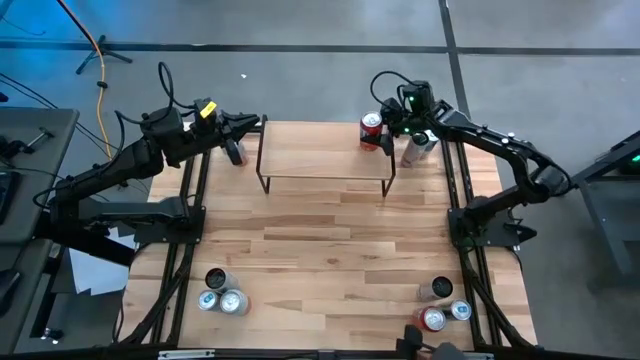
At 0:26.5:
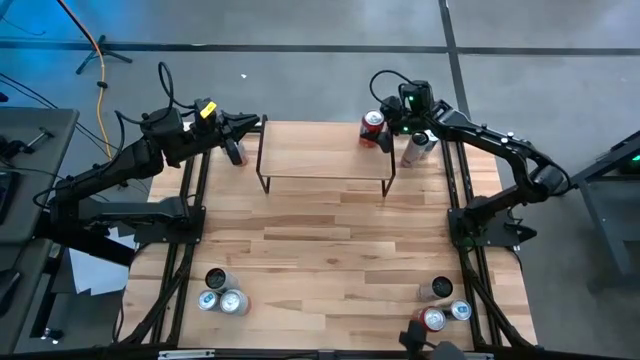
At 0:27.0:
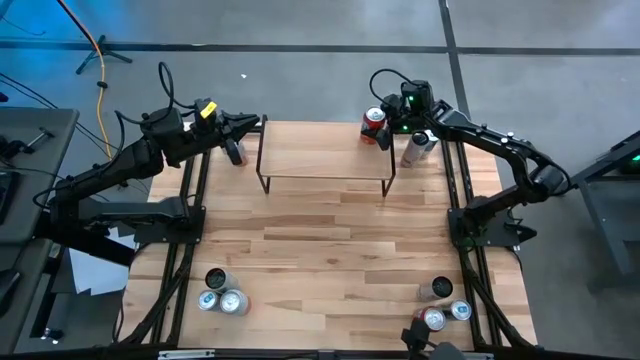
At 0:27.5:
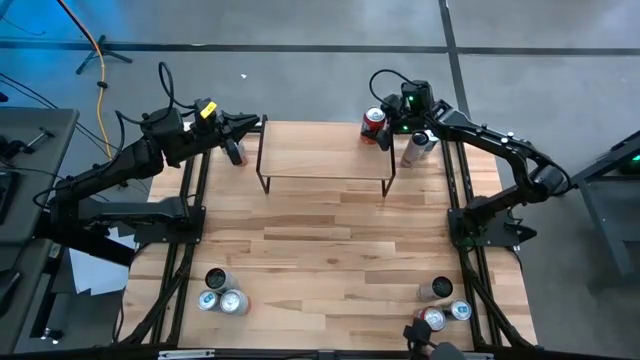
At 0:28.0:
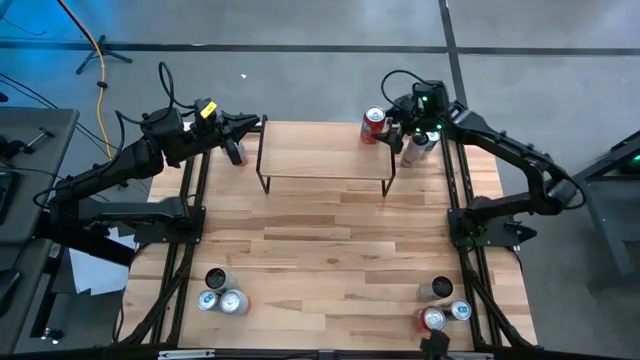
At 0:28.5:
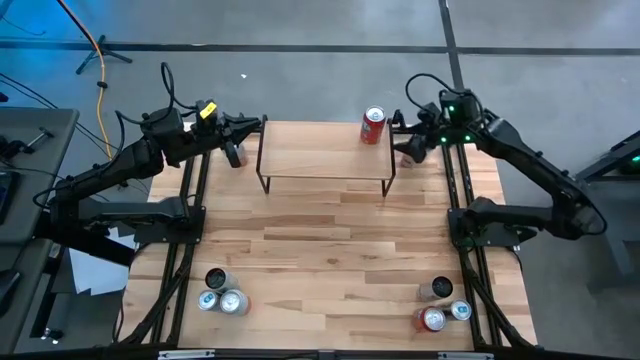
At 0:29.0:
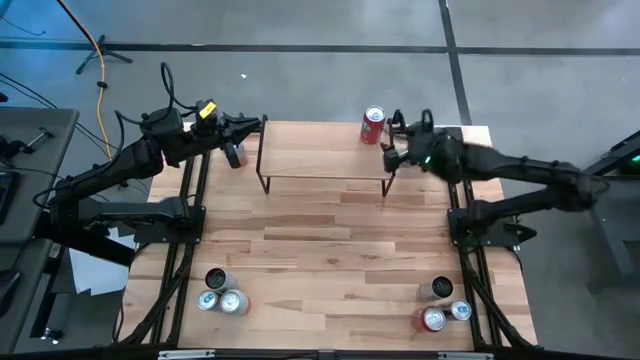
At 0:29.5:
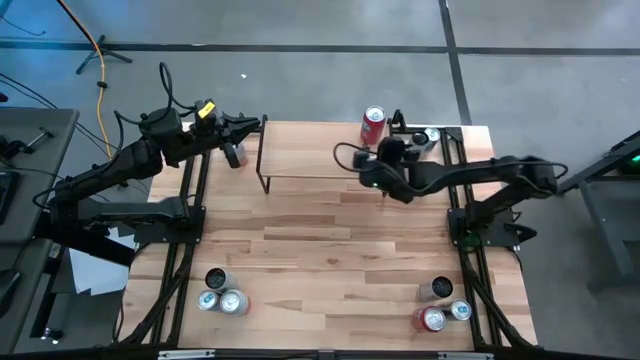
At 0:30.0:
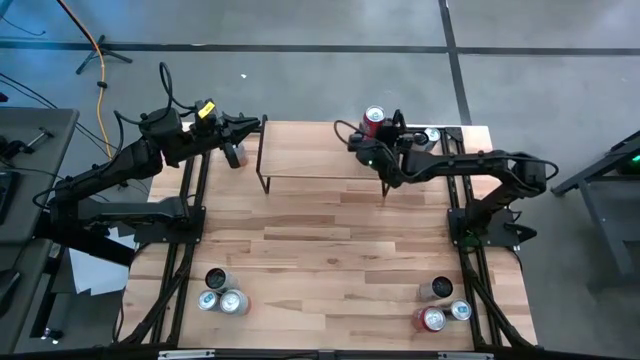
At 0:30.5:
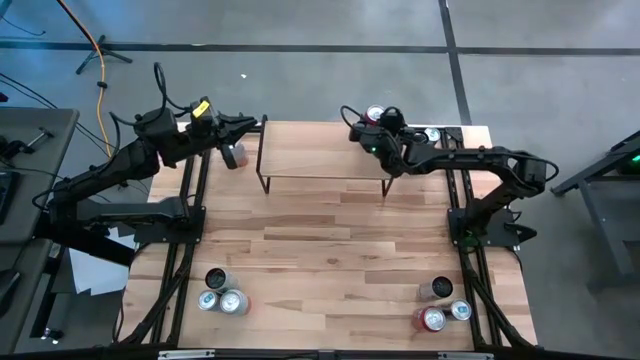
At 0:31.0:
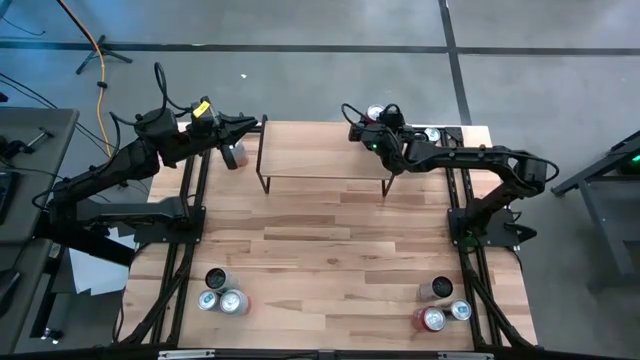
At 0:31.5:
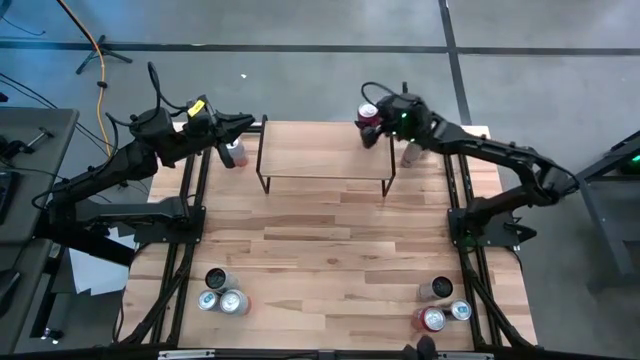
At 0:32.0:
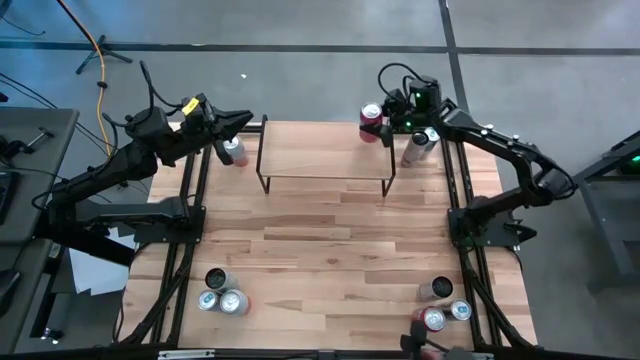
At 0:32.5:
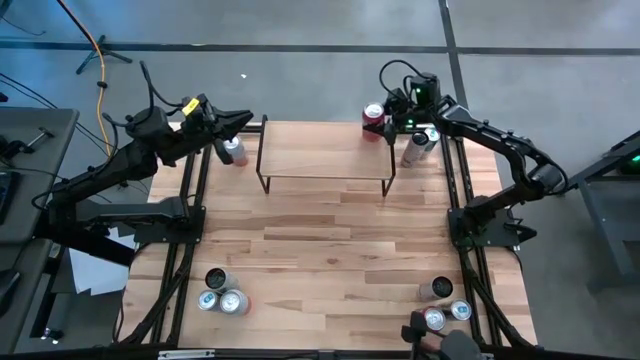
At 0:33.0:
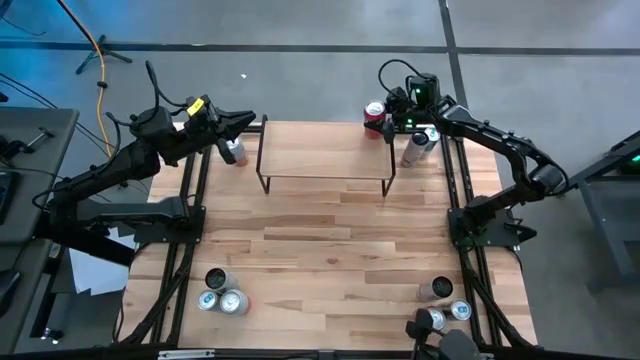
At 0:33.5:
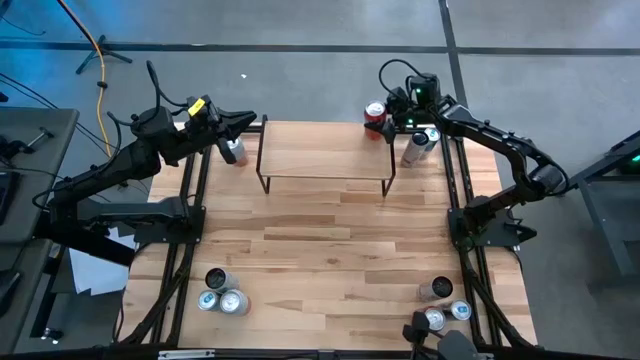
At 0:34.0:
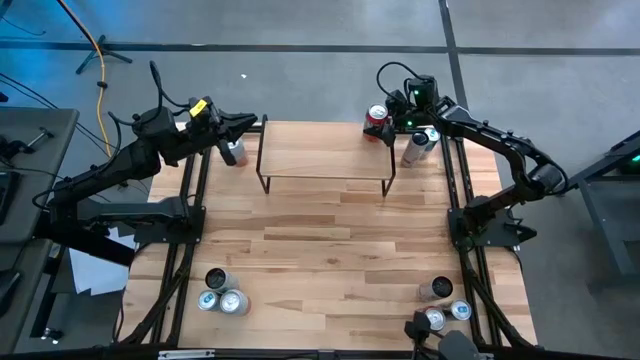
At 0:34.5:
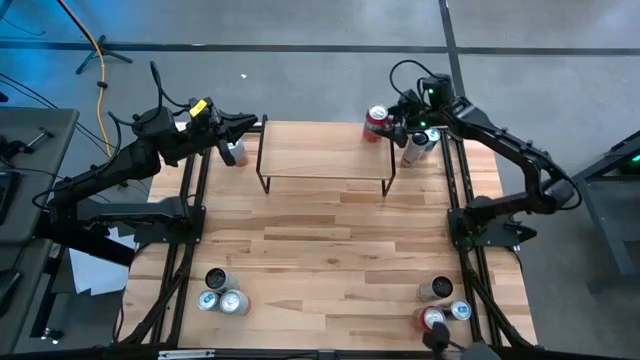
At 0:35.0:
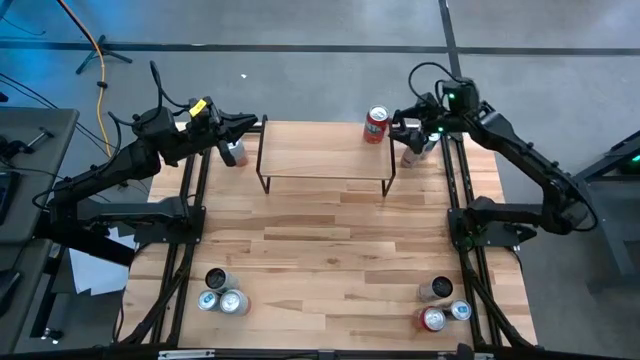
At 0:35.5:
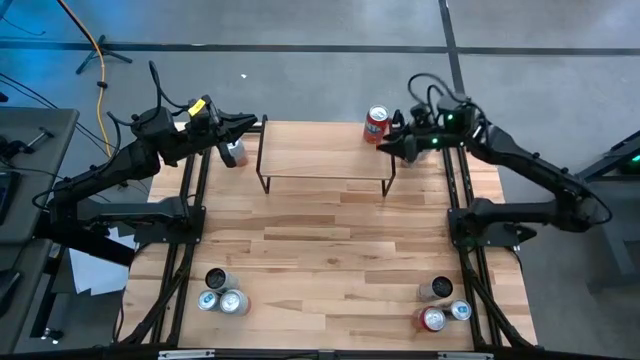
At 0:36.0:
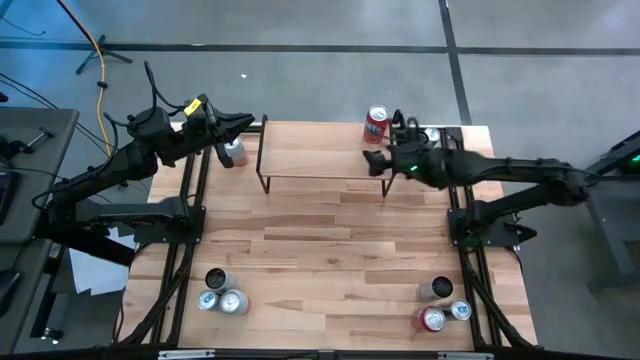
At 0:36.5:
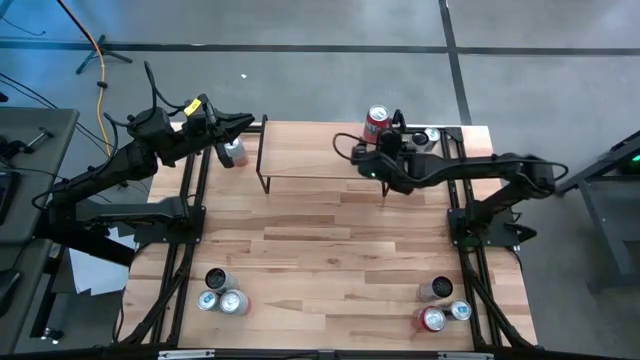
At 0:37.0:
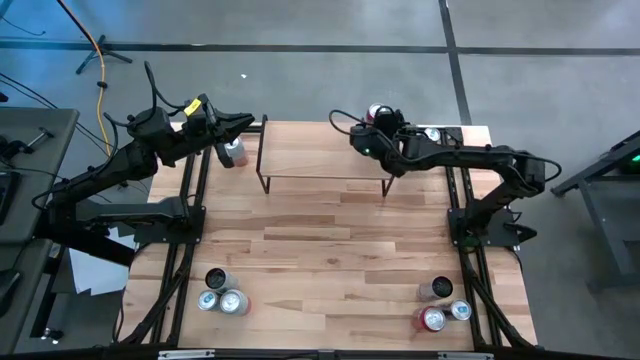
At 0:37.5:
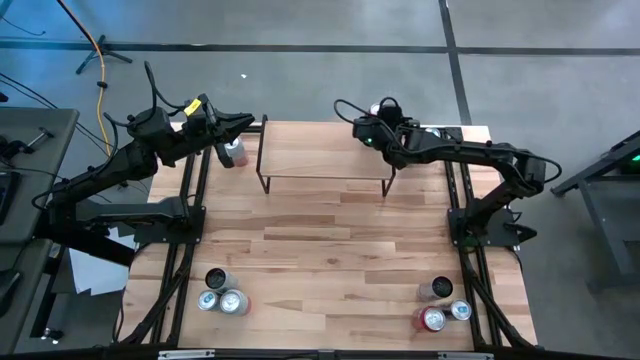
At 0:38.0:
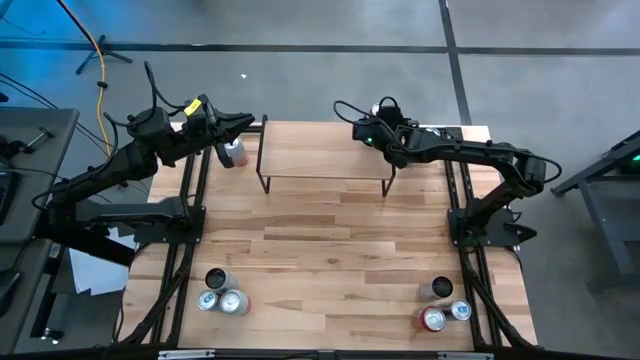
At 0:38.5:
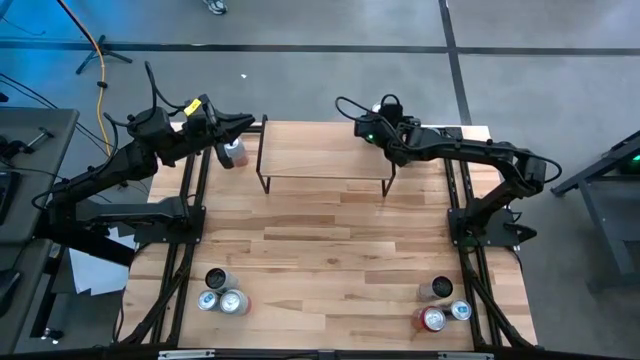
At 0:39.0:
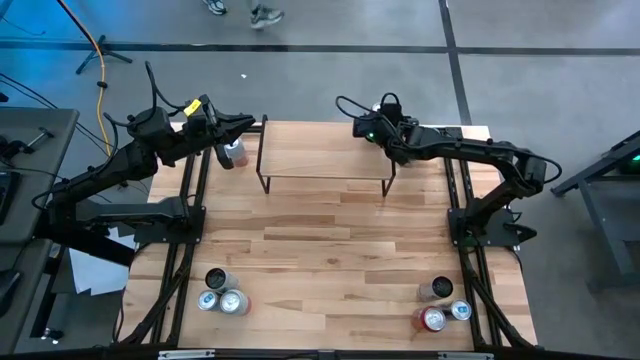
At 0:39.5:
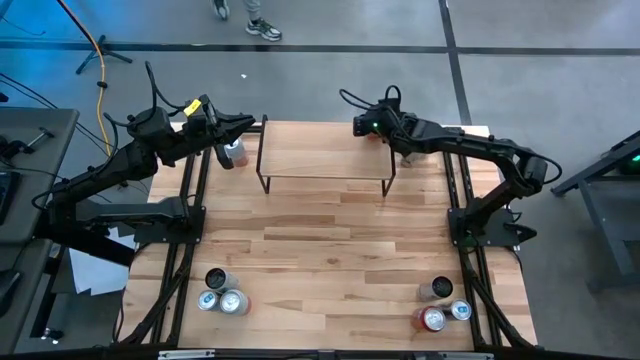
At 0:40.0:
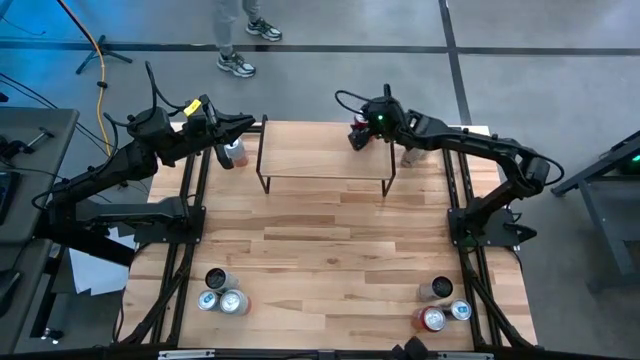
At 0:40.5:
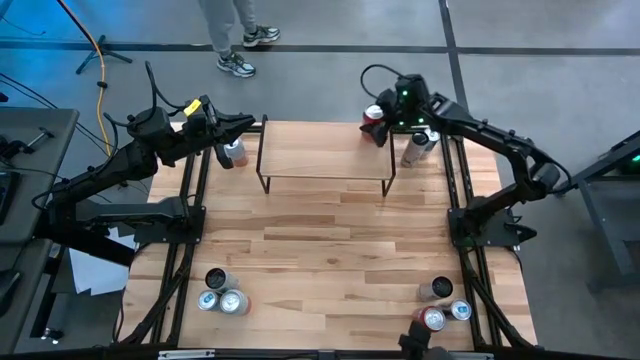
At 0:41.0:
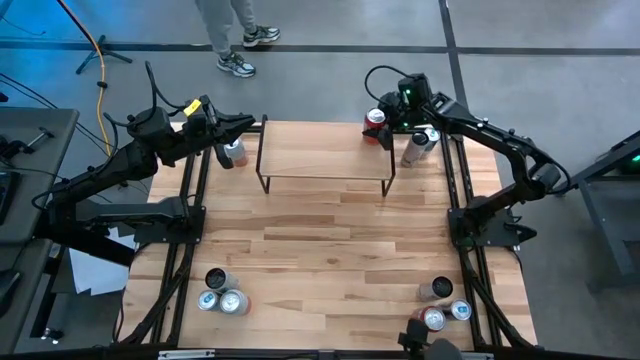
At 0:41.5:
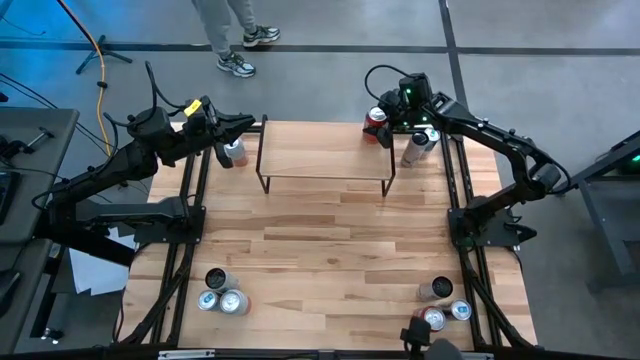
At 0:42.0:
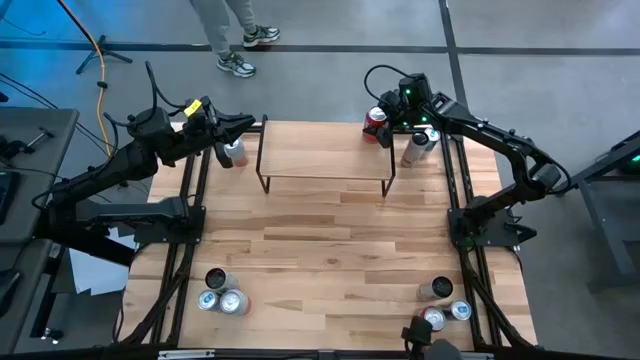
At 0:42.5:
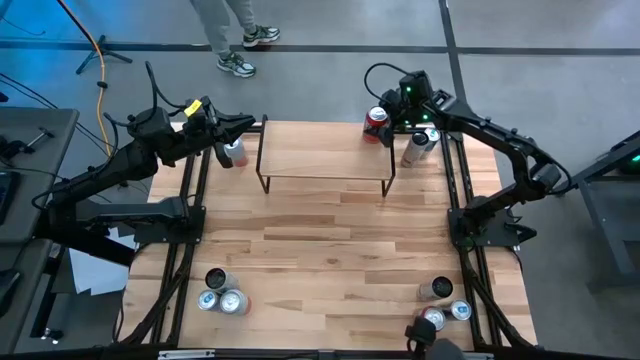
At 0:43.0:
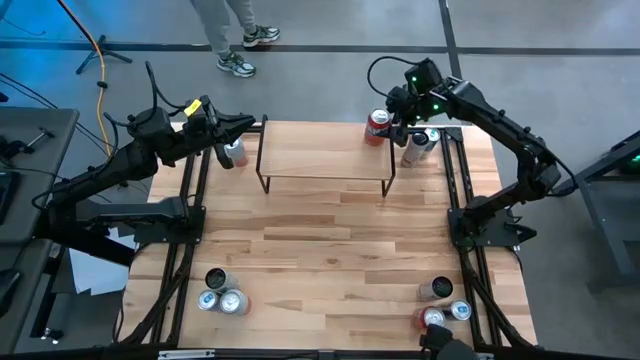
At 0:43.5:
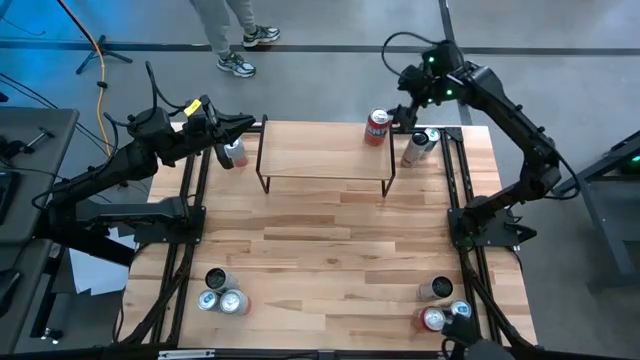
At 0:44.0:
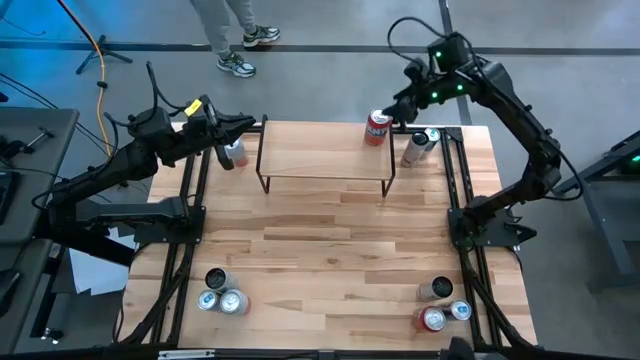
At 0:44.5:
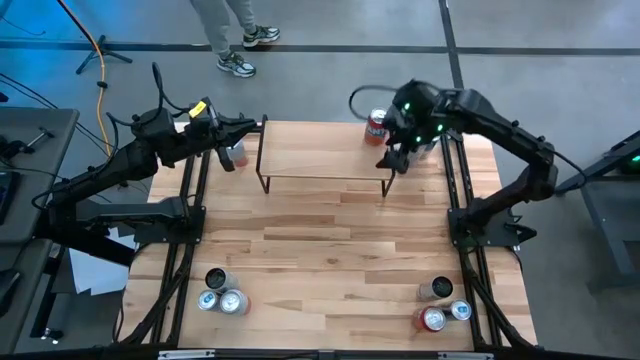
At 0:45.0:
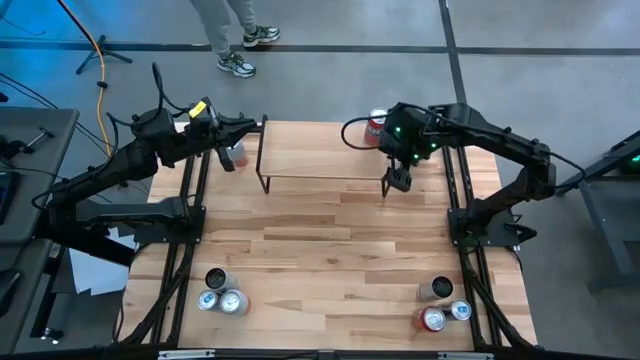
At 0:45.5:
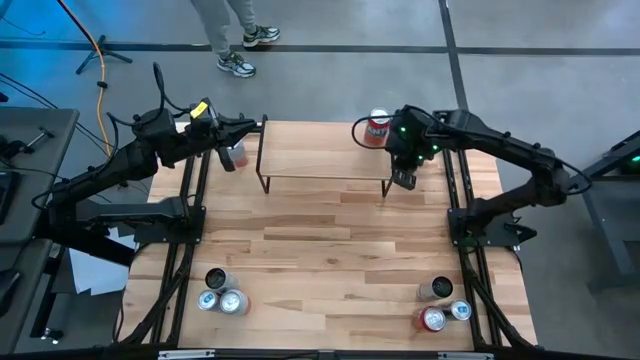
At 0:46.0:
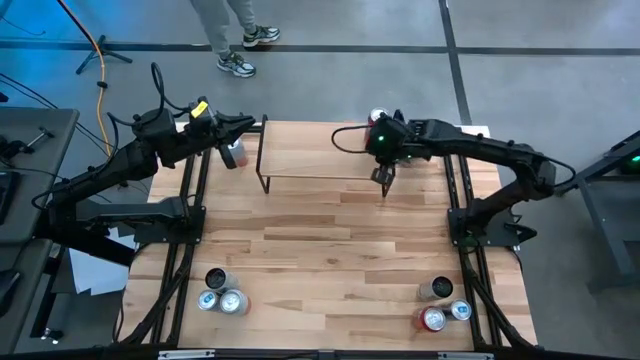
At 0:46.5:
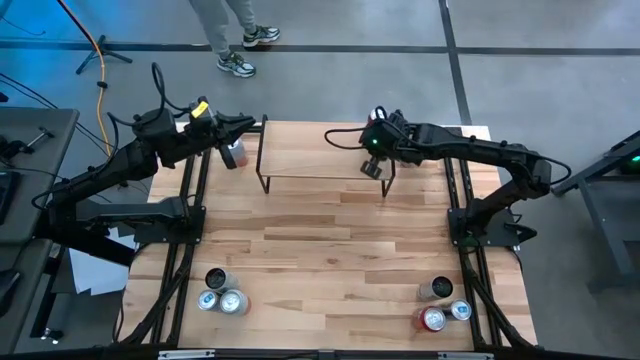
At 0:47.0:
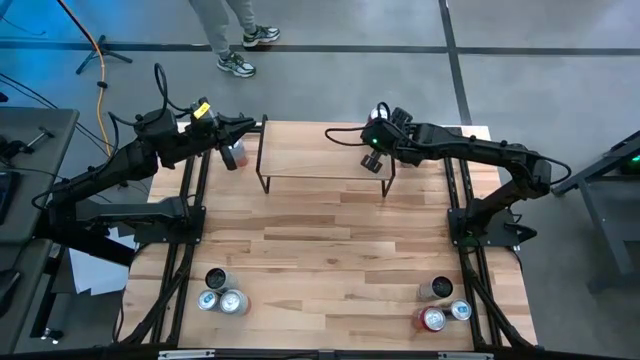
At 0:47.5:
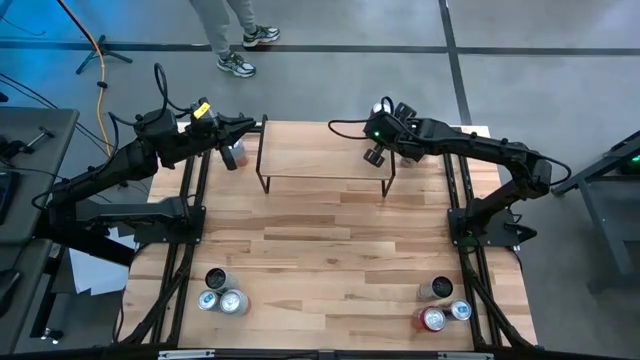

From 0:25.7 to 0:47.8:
Task: Place canned beverage on shelf
Put the top red soda can on the shelf
